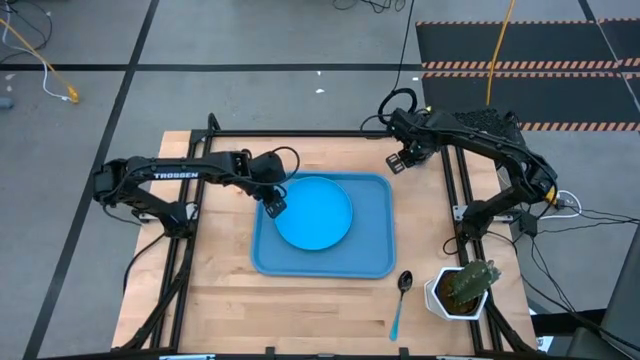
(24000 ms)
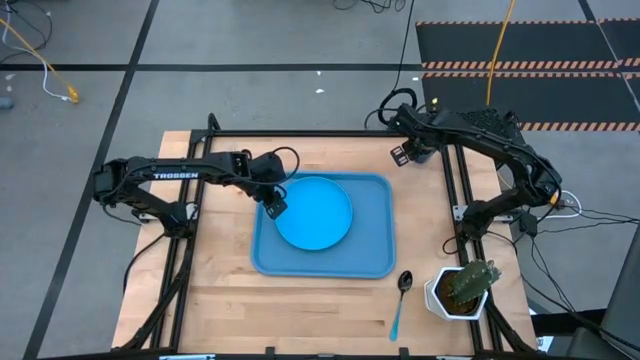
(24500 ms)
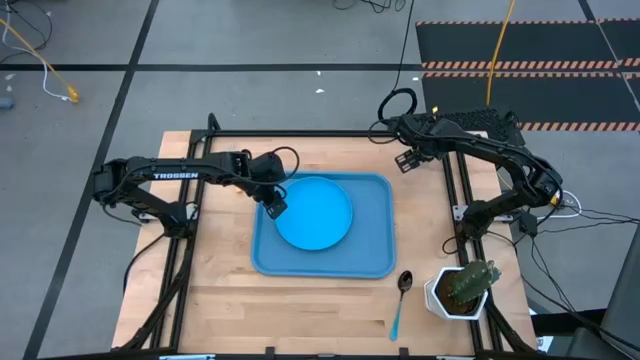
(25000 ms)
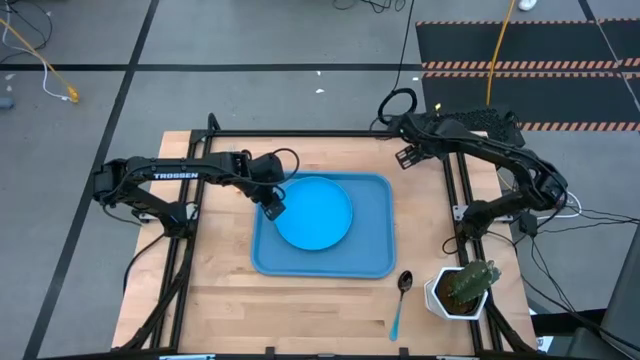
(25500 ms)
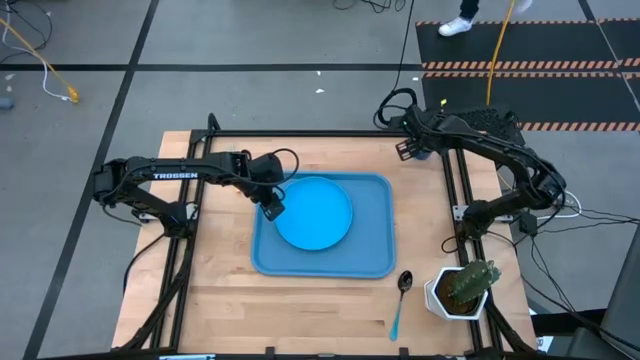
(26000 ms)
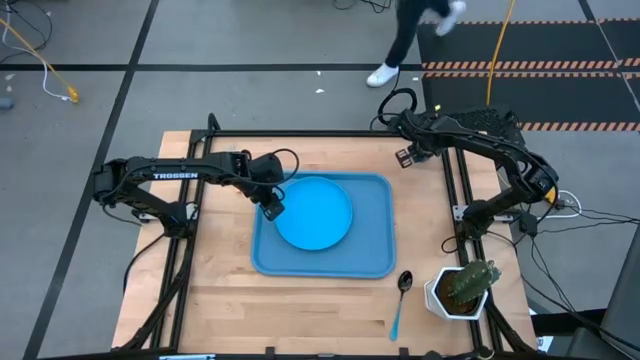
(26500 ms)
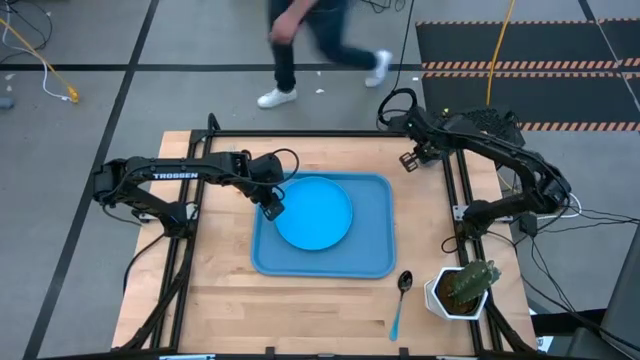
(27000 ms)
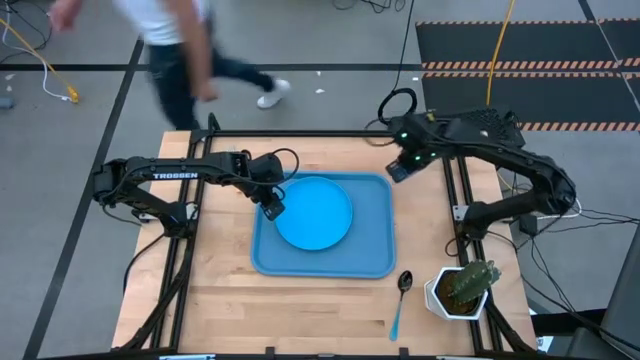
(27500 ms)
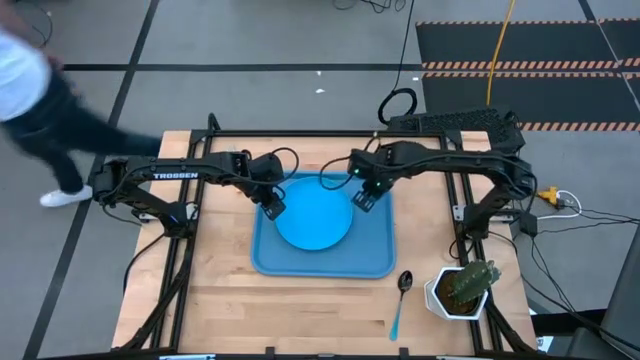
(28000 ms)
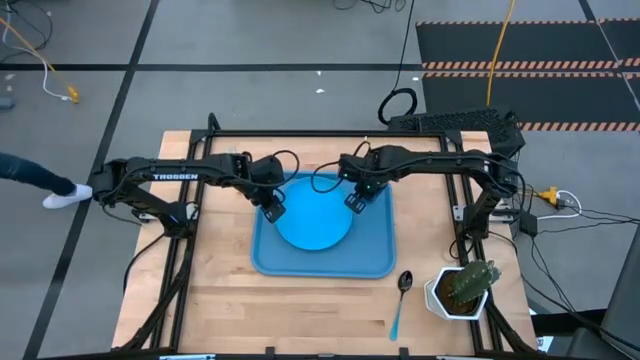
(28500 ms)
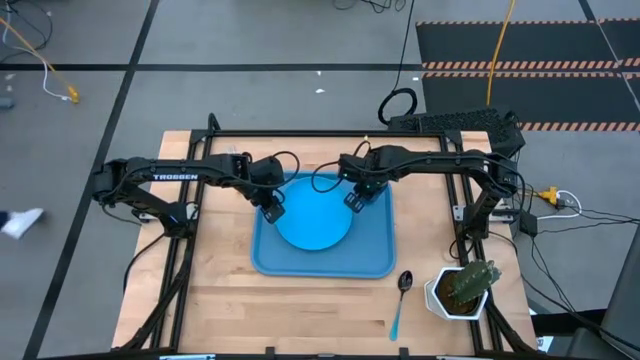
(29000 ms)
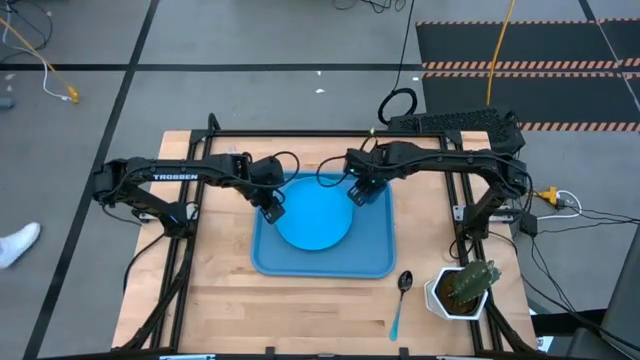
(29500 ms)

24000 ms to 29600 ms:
Task: Pick and place plate/cup/fork/spoon on tray
Put the blue cup on the blue tray to the top right of the blue plate

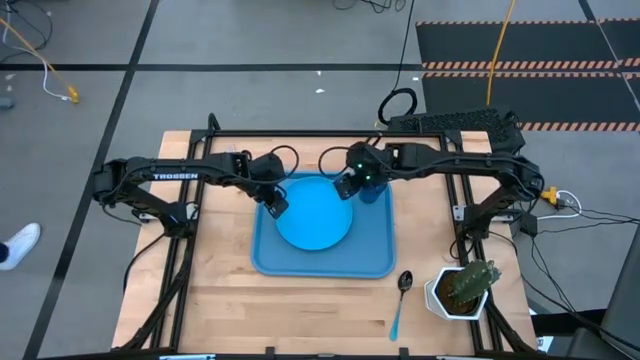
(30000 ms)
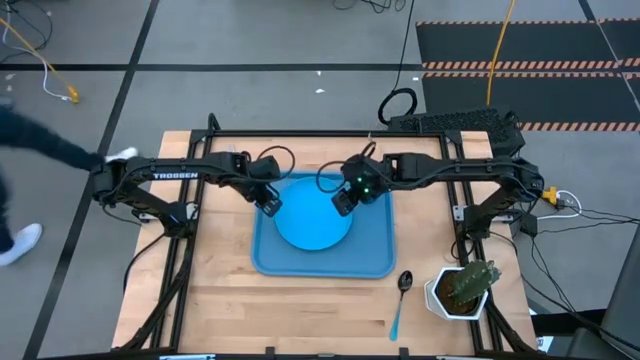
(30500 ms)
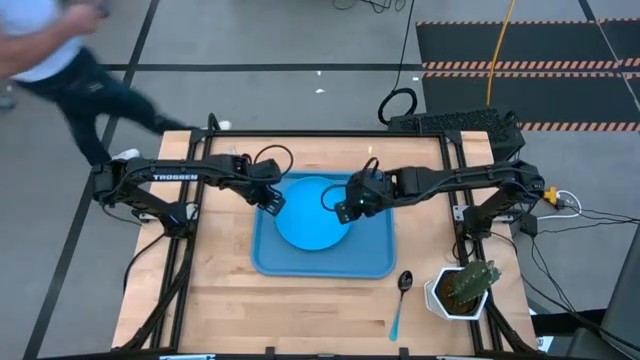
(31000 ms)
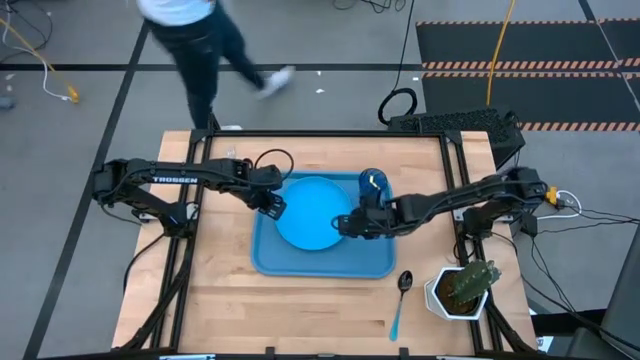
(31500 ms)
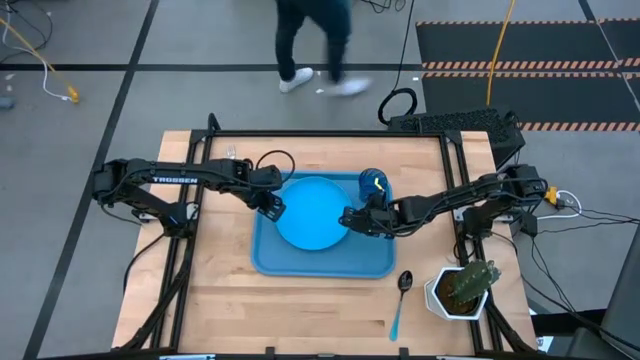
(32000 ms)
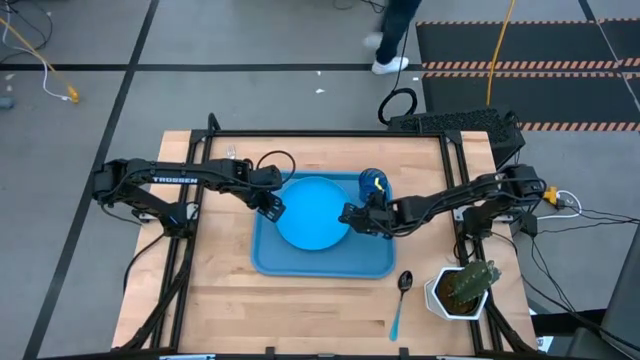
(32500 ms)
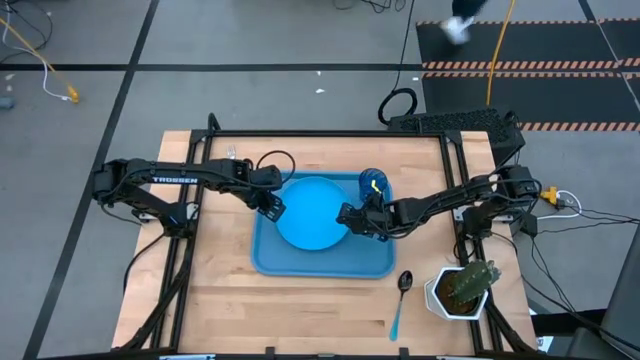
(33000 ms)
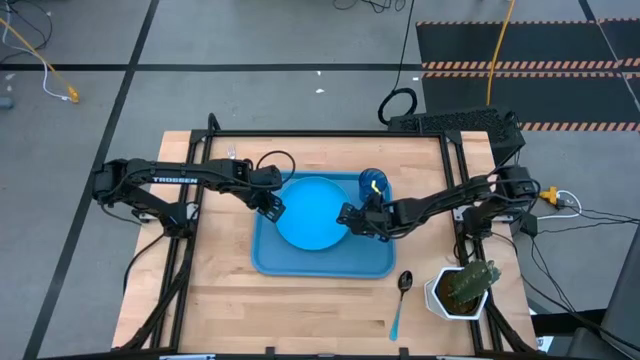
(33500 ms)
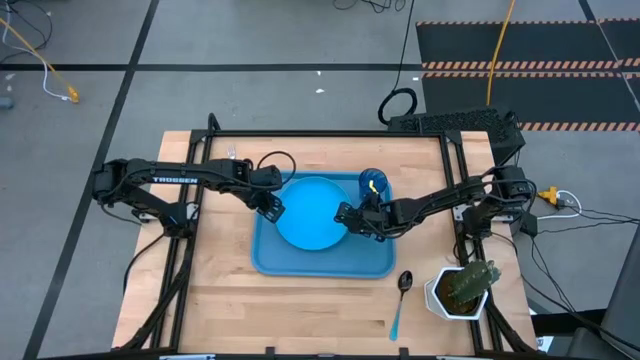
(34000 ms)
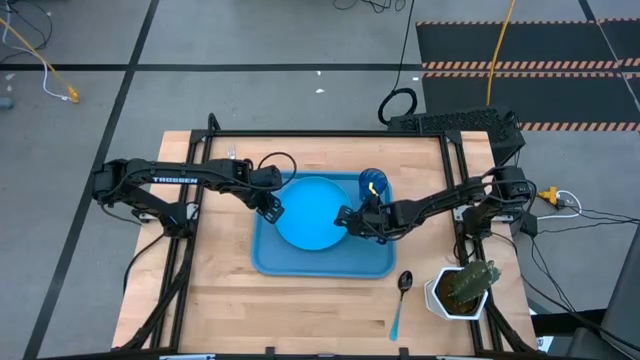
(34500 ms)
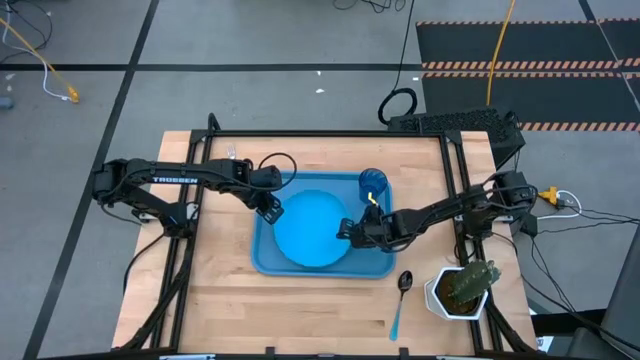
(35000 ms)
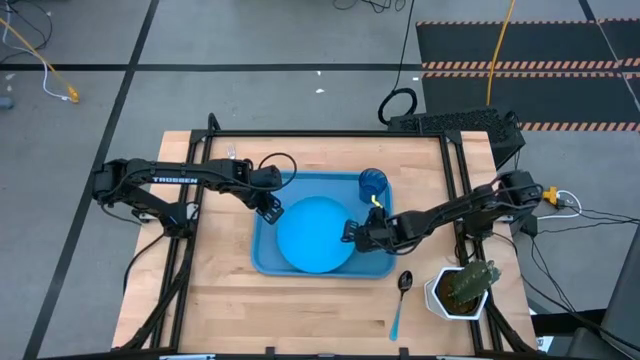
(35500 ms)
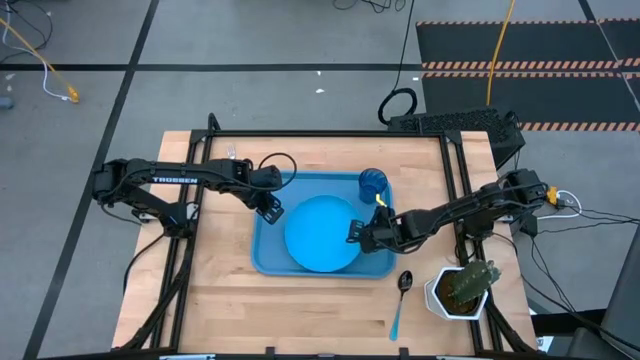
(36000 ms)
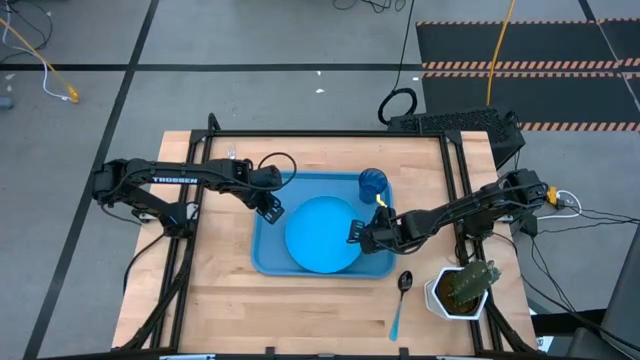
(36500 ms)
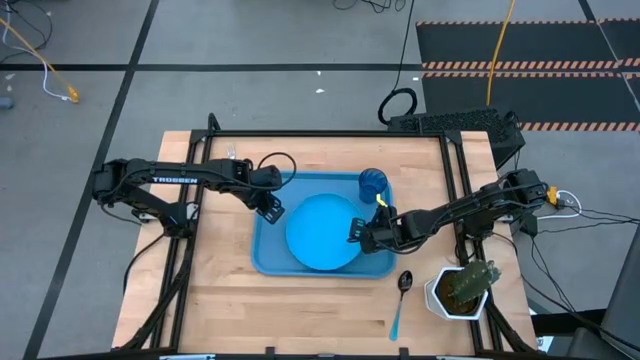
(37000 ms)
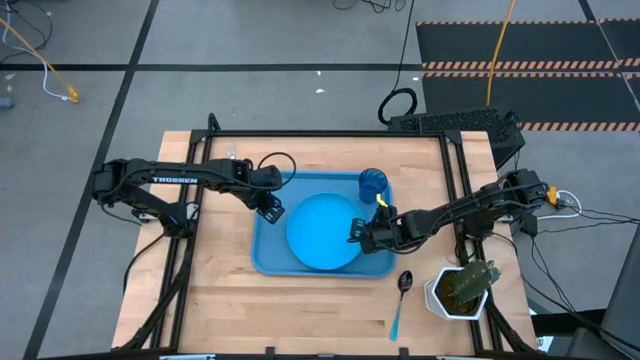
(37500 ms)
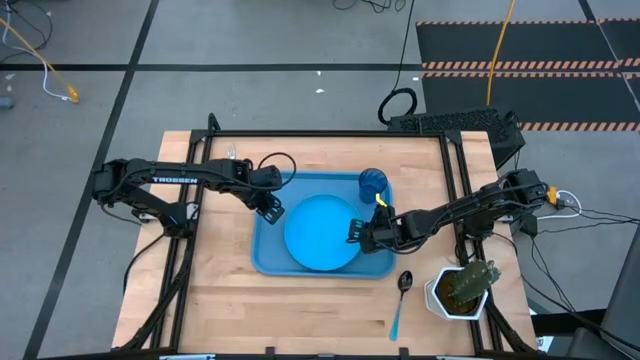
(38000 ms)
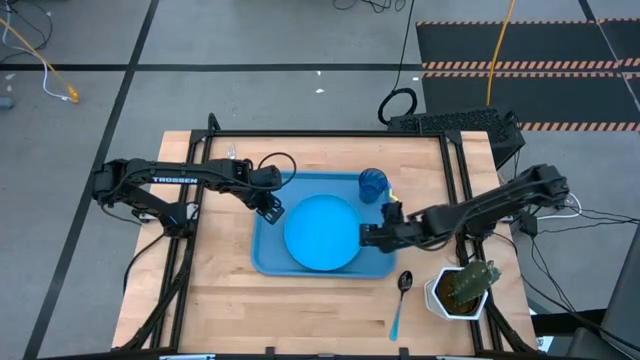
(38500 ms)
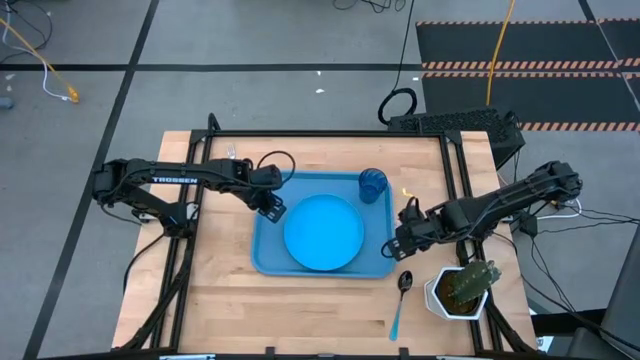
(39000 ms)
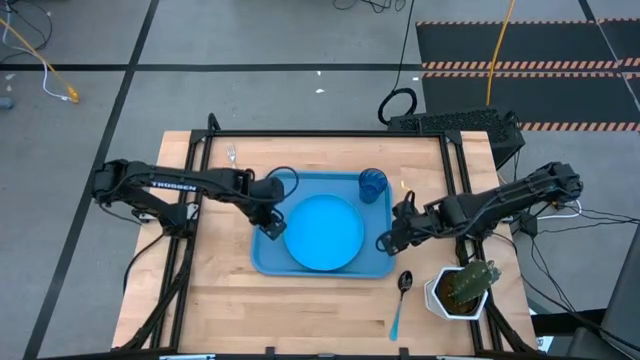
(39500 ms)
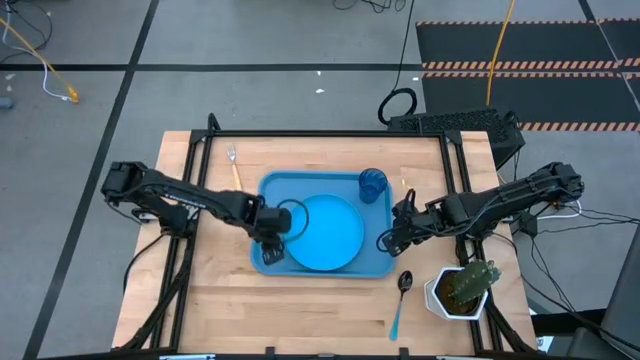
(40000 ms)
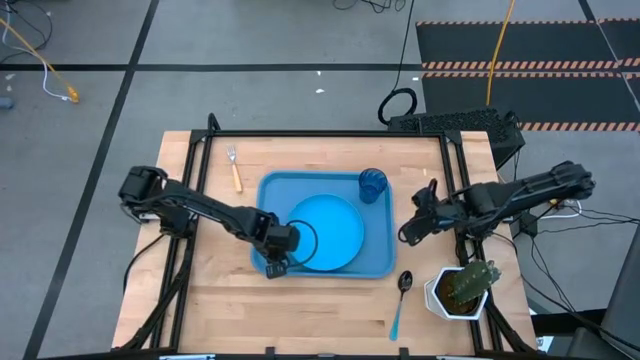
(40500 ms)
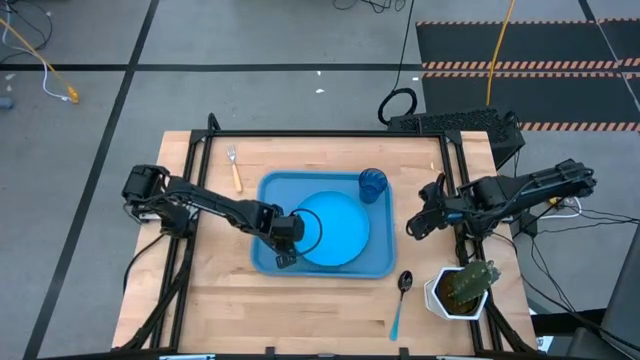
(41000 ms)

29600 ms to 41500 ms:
Move the blue plate to the center of blue tray

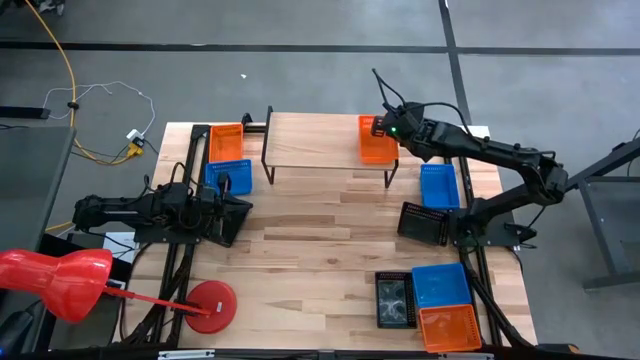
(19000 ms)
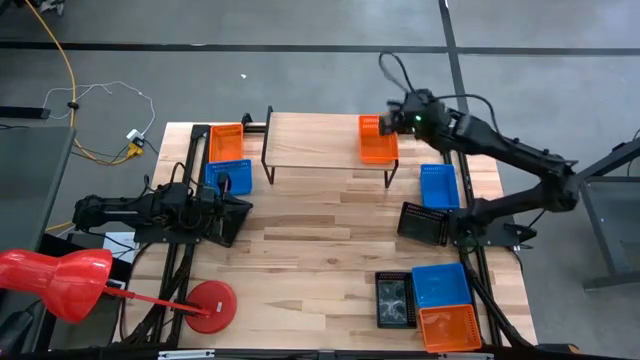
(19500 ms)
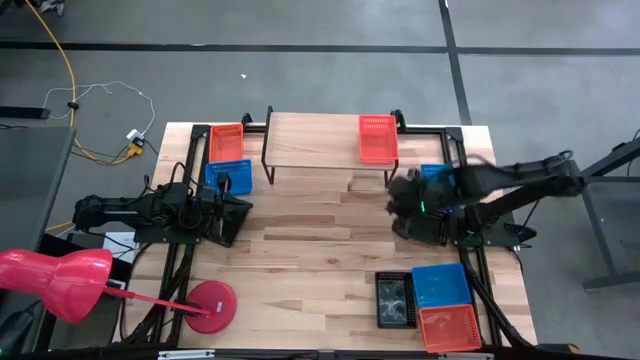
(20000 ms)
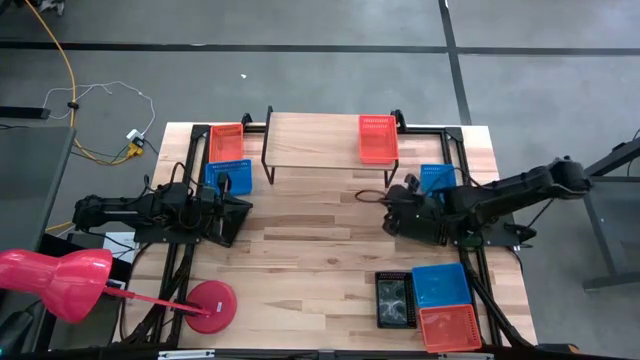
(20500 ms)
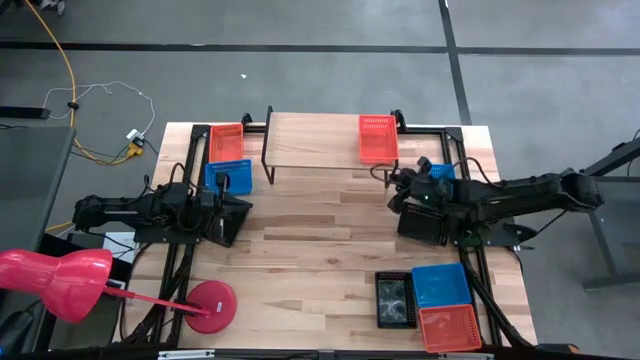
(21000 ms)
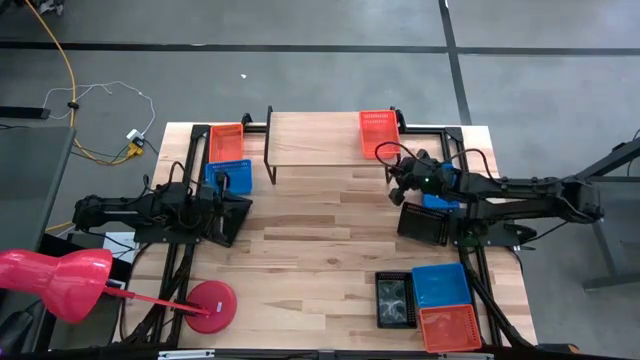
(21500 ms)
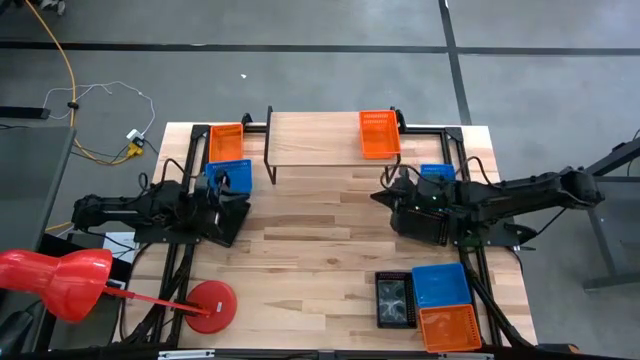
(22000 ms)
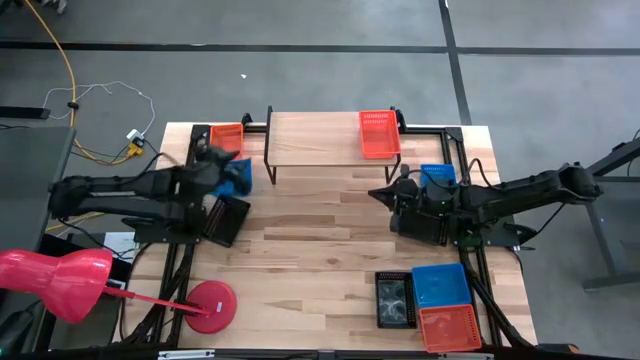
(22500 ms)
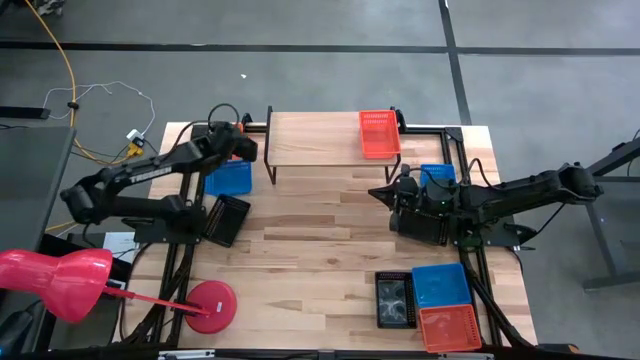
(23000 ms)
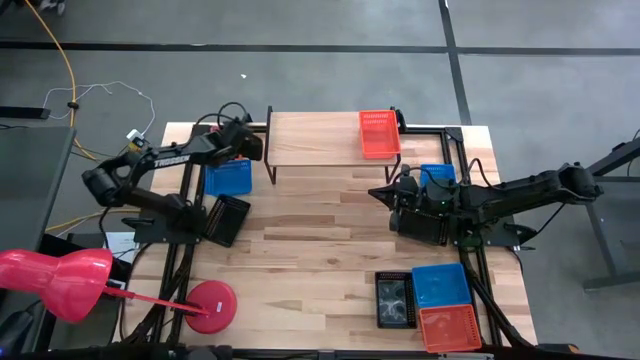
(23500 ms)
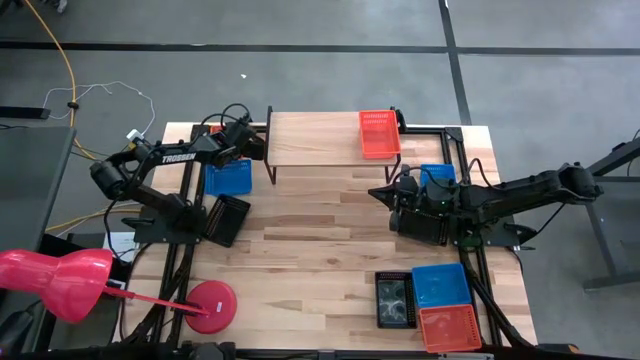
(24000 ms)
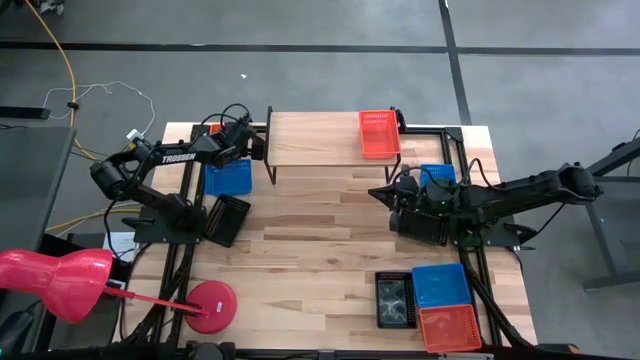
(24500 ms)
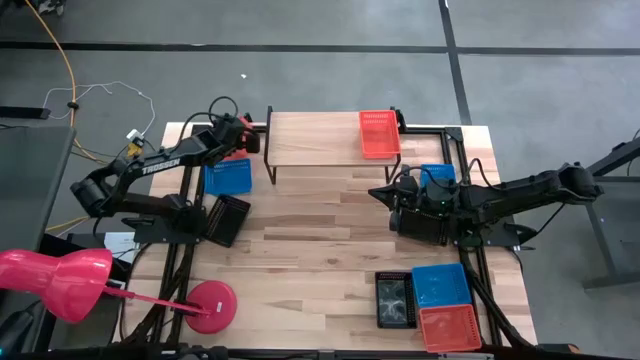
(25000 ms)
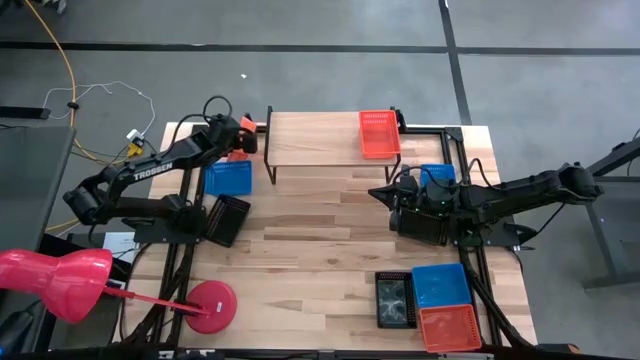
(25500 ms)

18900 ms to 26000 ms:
Task: Stack baskets on shelf by color
Stack the top left orange basket on the other orange basket on the shelf
